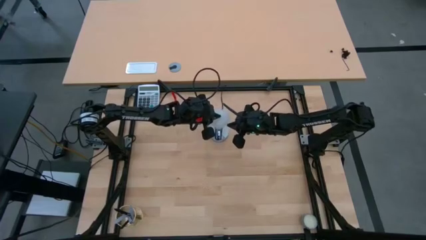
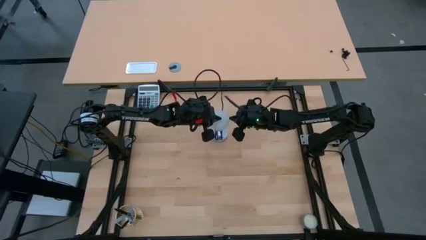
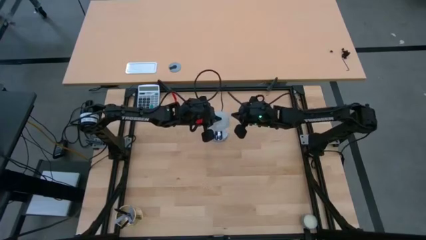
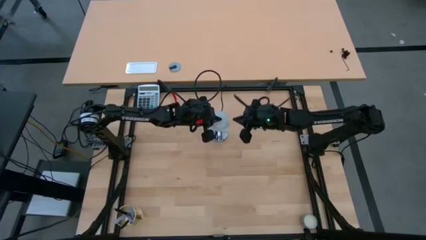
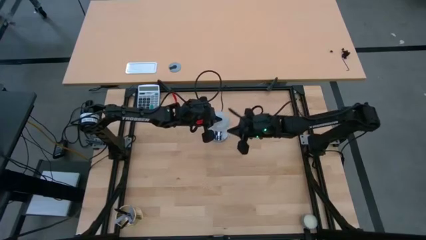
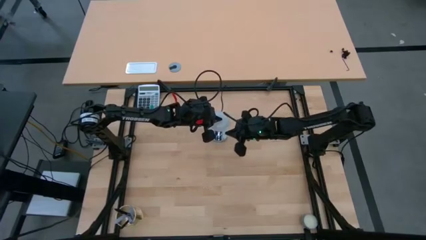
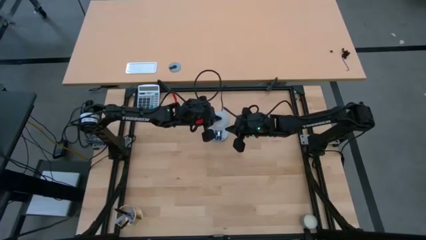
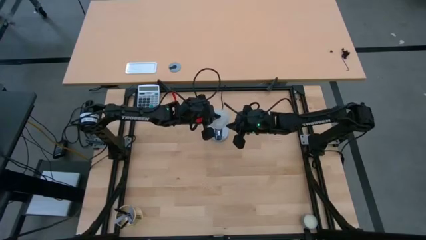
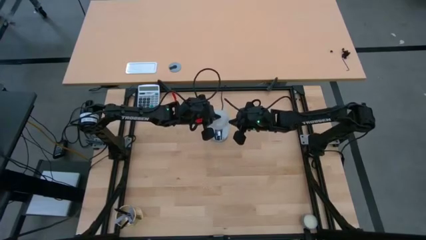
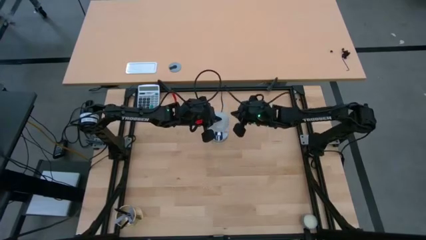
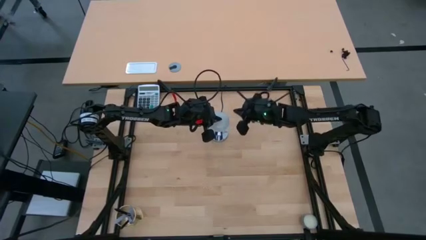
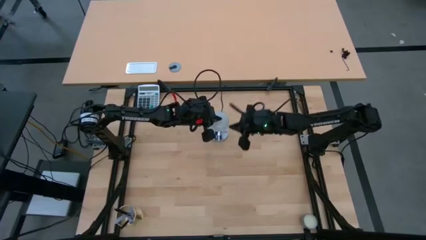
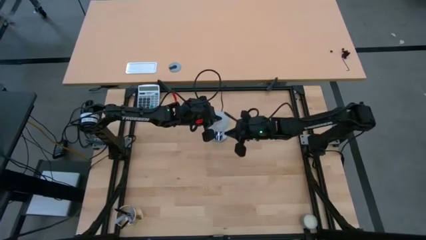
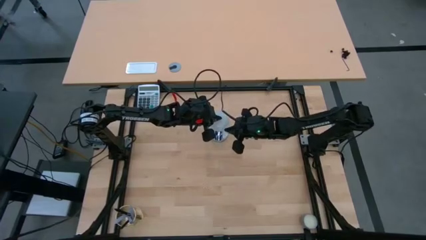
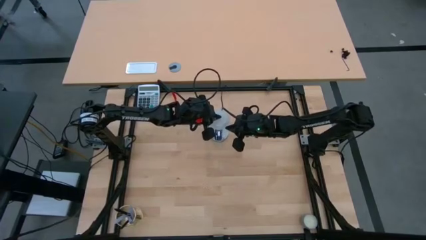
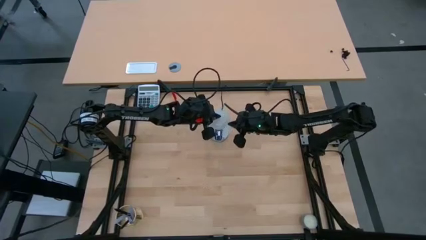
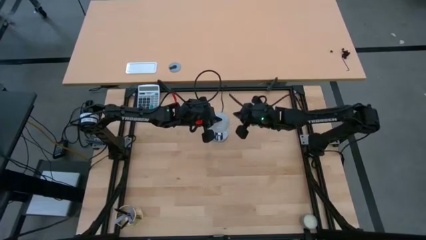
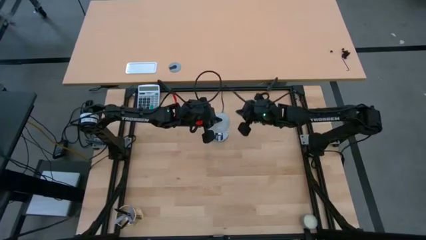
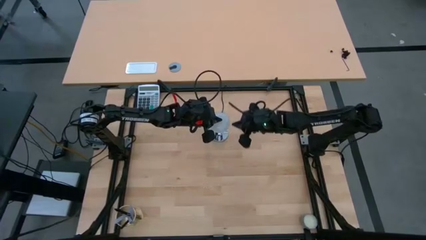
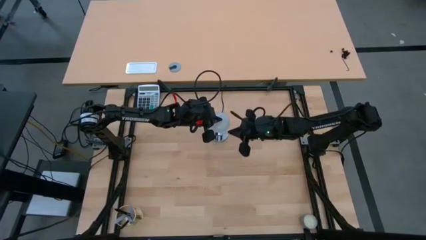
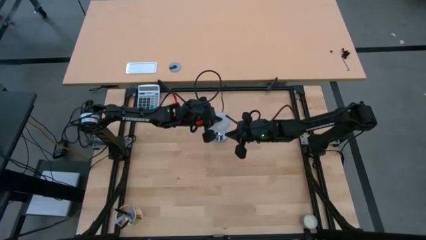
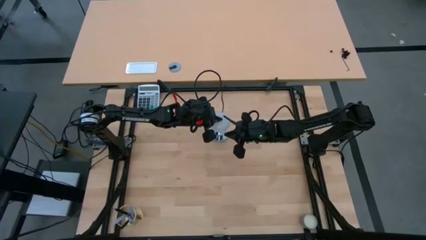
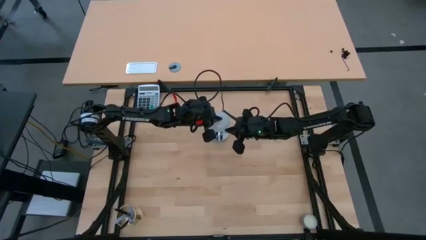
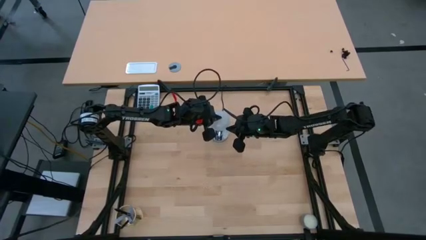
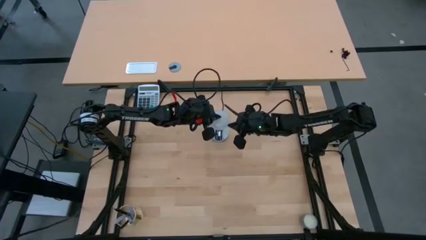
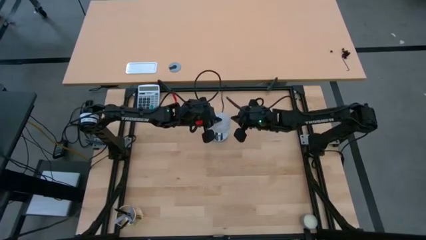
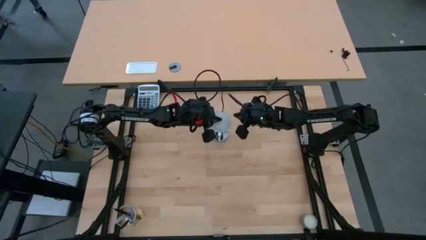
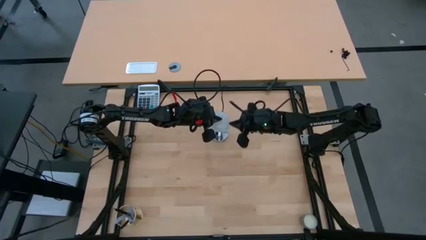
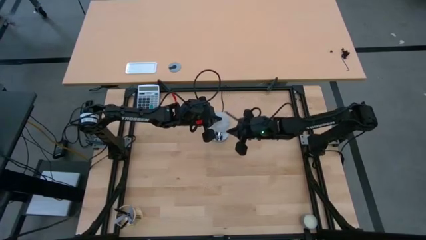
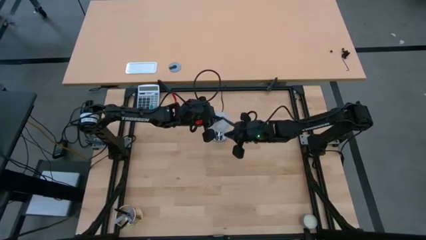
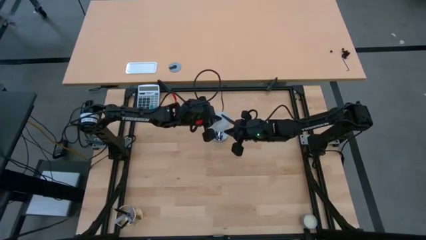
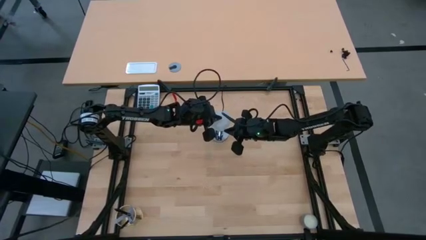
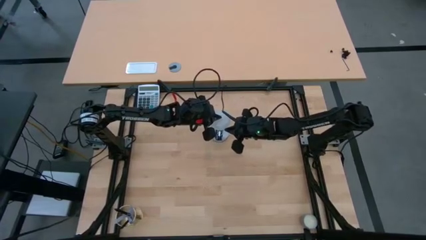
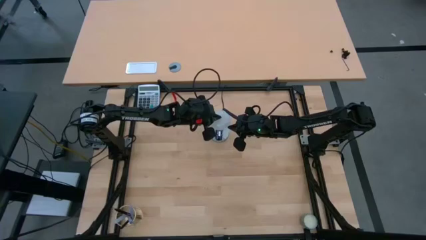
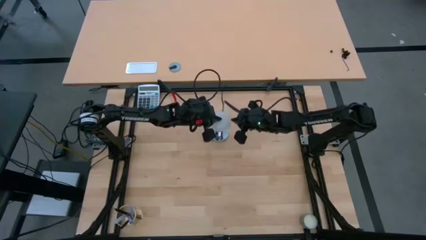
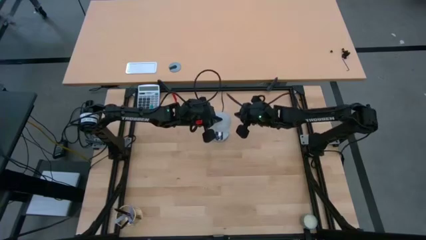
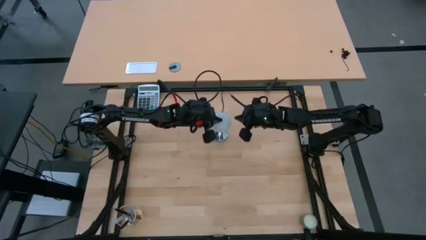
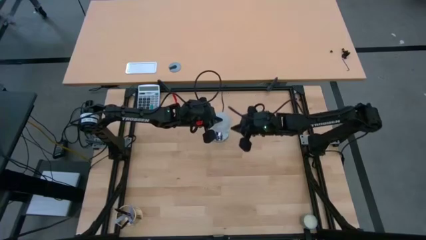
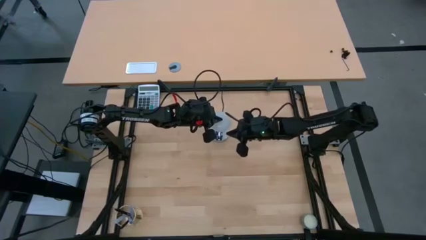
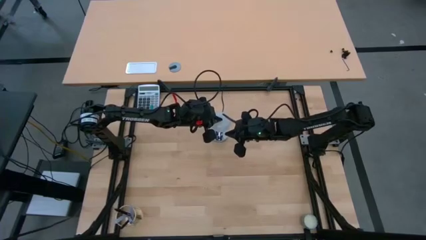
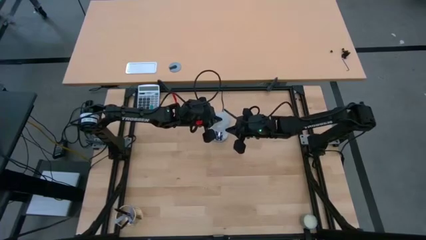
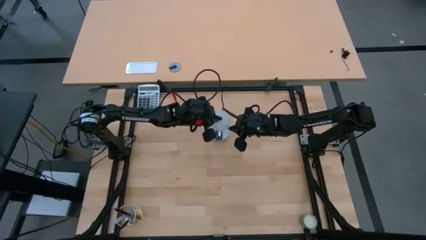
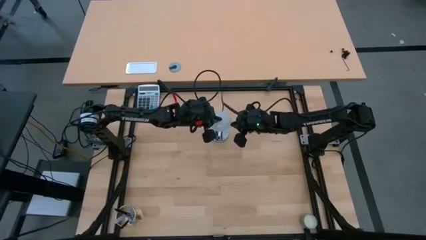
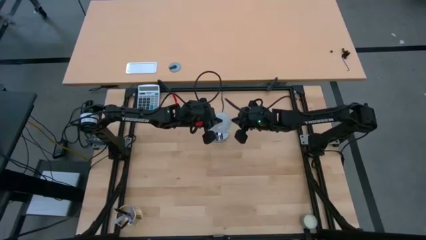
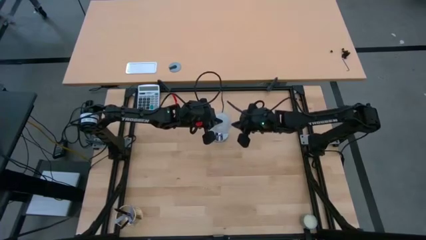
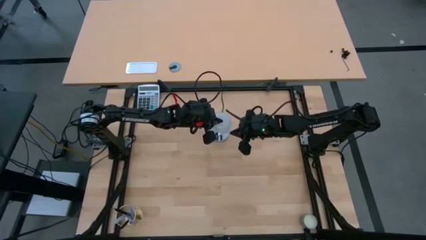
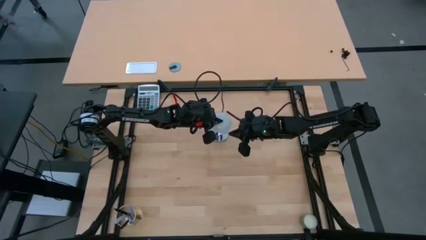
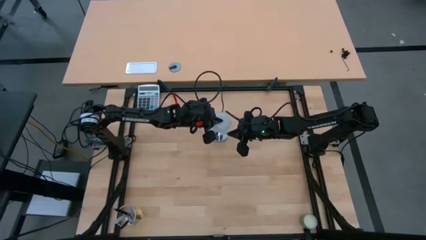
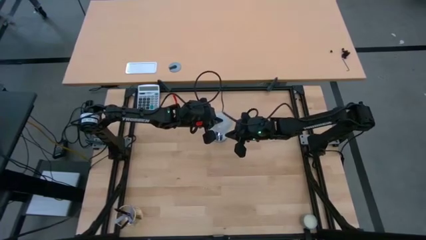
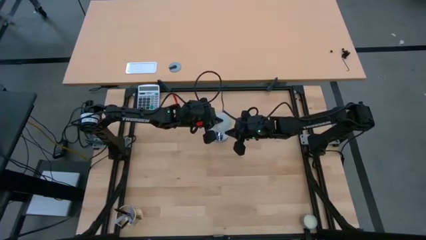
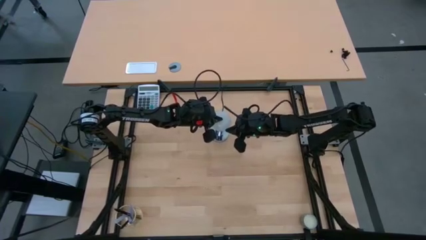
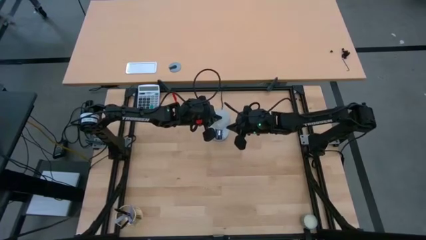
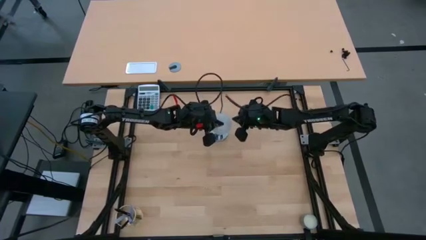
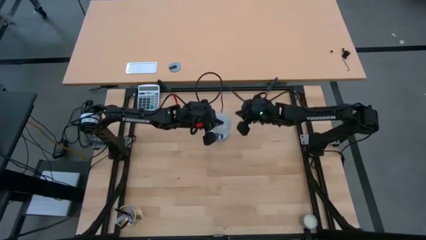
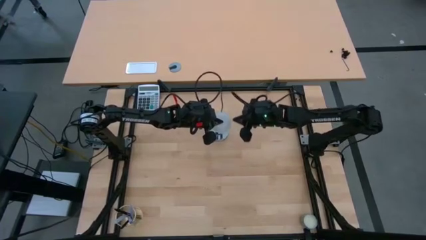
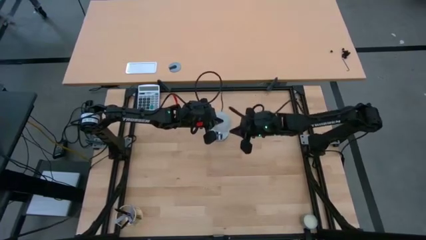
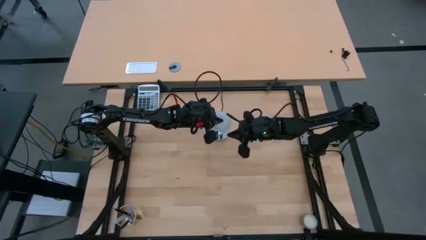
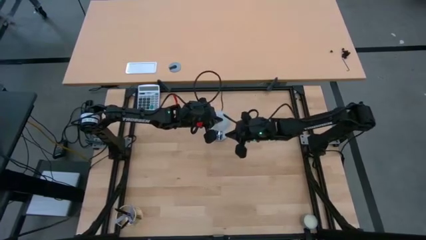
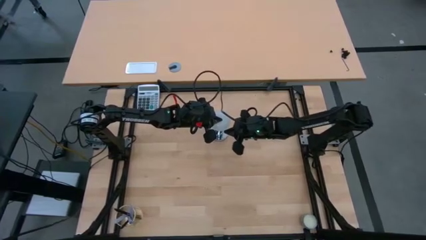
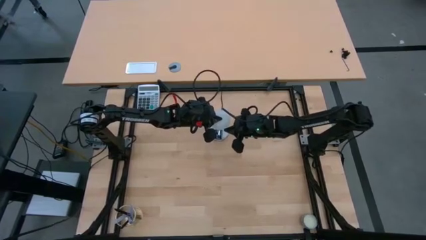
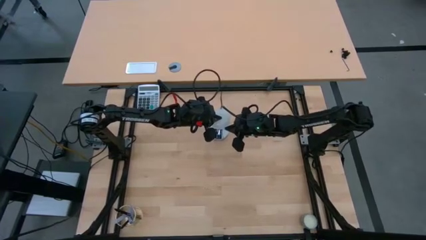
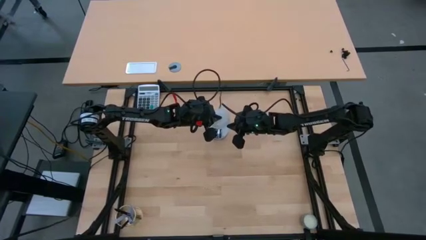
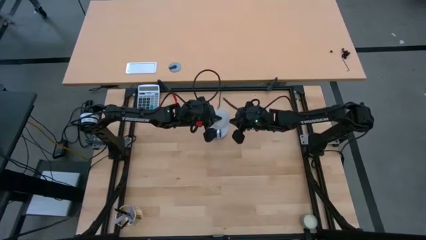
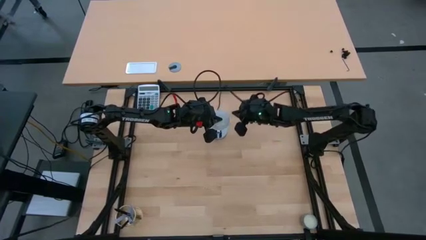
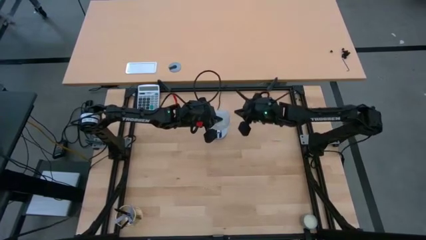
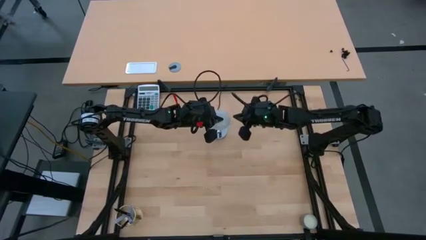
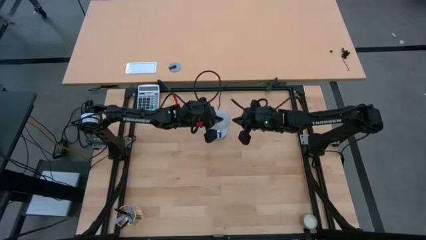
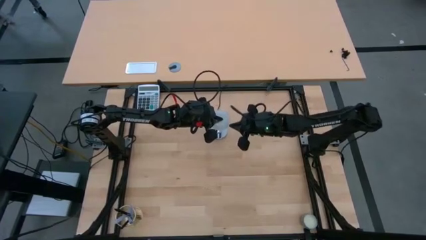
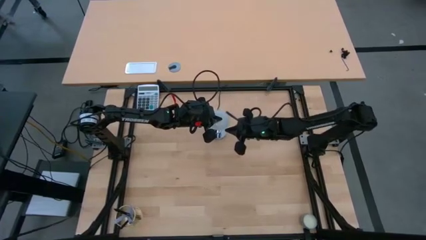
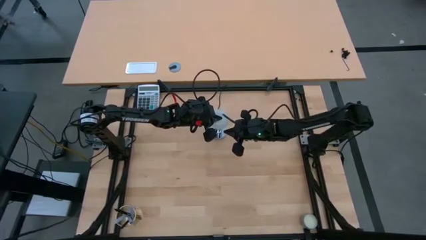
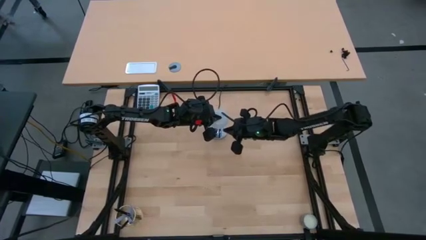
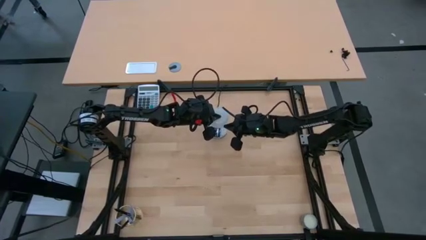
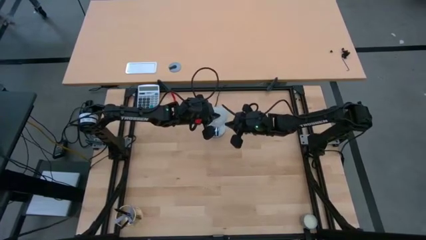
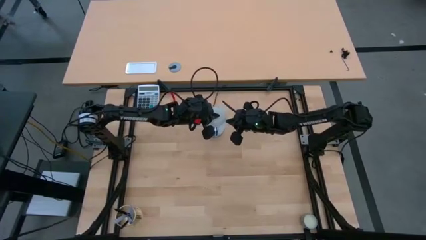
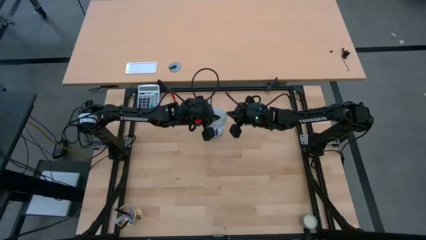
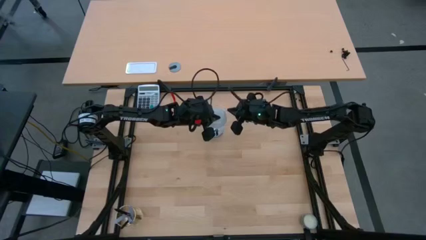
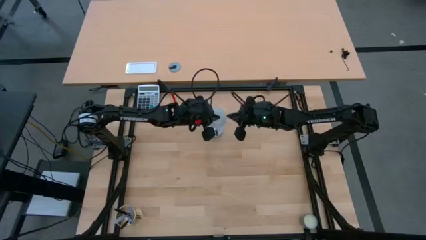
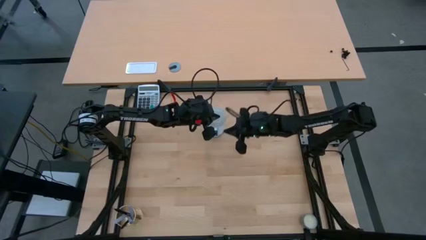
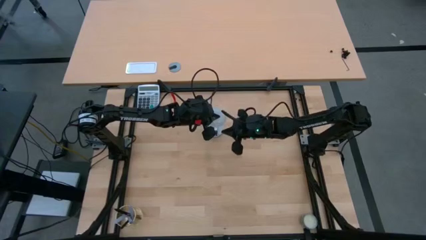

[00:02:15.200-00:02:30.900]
Task: Screw lightbulb
Remove the lightbulb from the lamp
